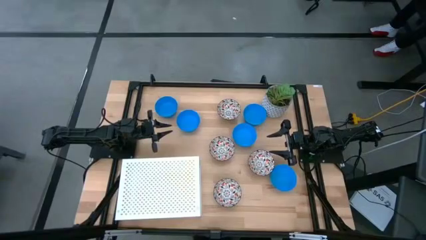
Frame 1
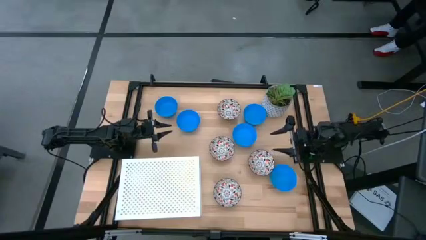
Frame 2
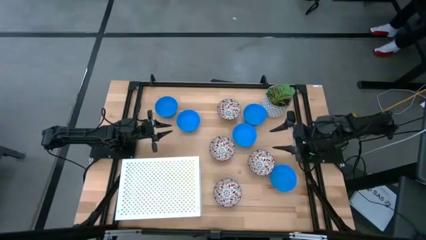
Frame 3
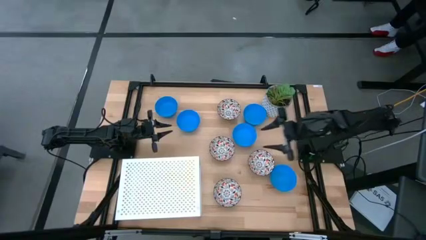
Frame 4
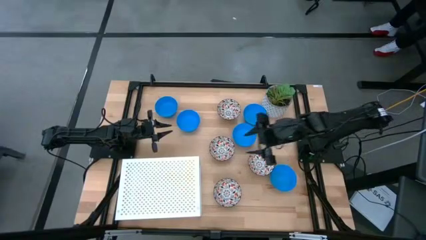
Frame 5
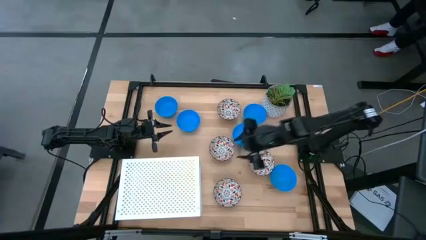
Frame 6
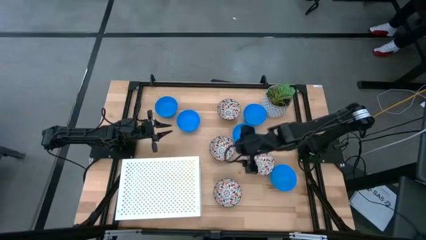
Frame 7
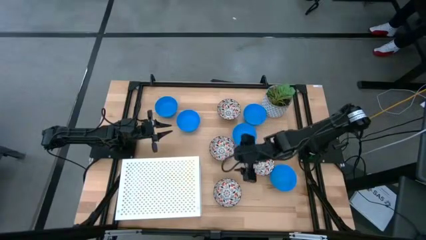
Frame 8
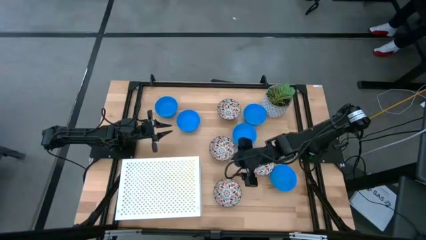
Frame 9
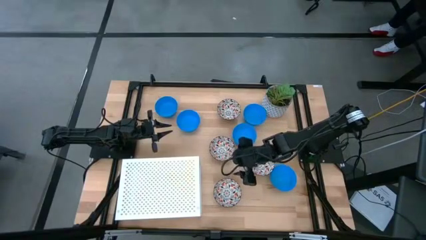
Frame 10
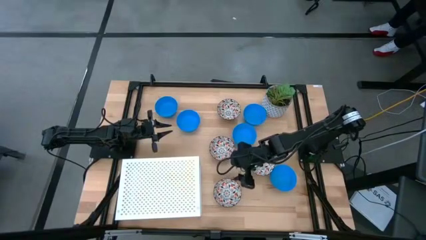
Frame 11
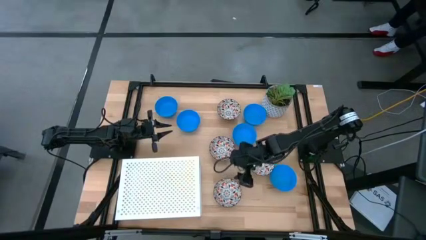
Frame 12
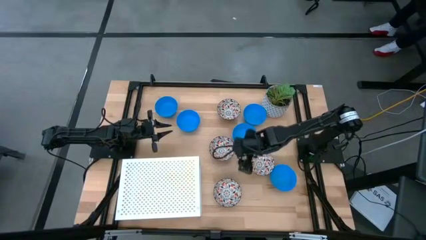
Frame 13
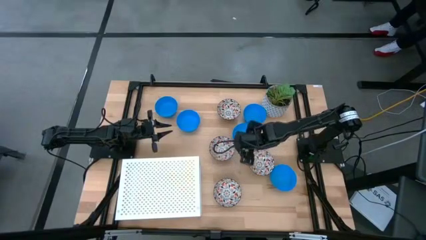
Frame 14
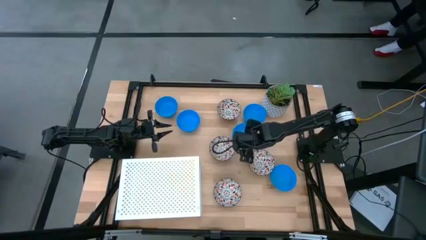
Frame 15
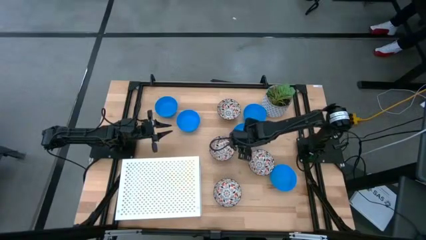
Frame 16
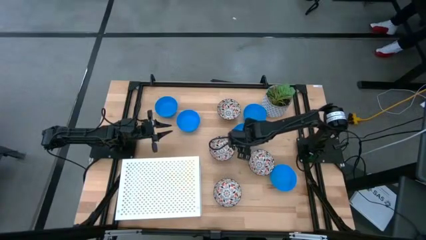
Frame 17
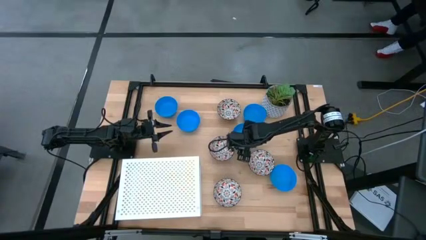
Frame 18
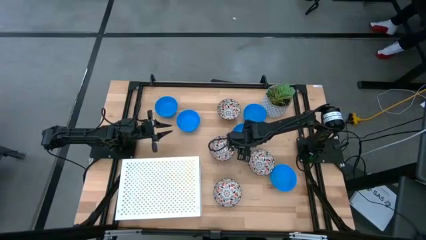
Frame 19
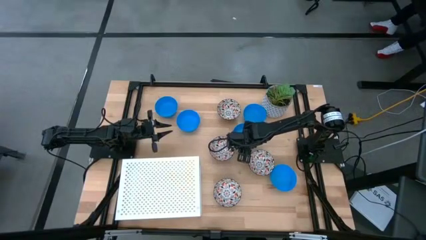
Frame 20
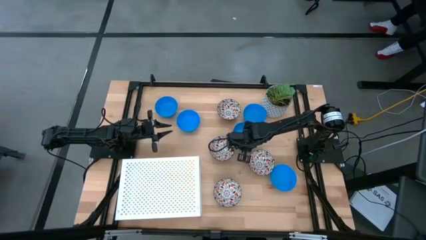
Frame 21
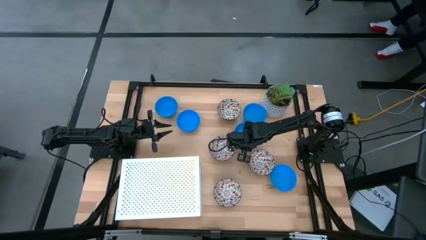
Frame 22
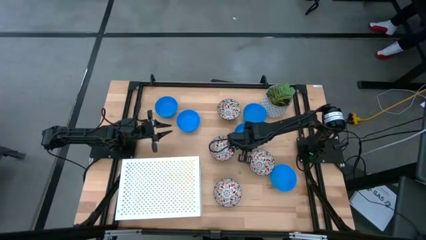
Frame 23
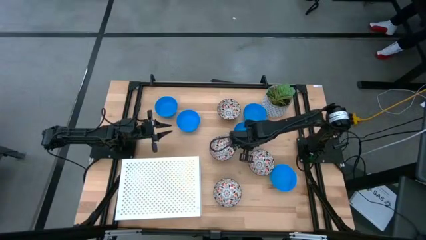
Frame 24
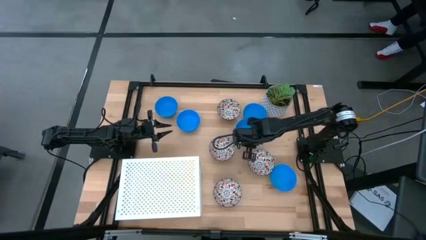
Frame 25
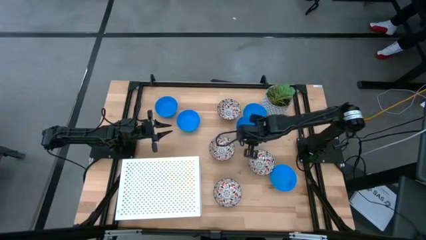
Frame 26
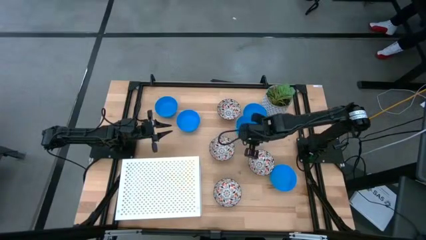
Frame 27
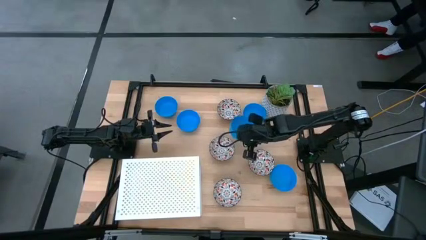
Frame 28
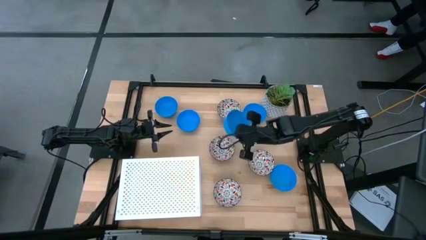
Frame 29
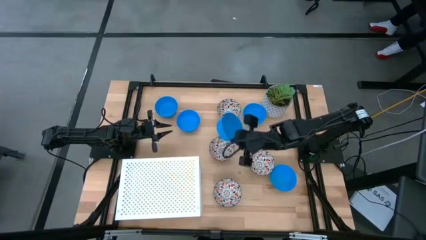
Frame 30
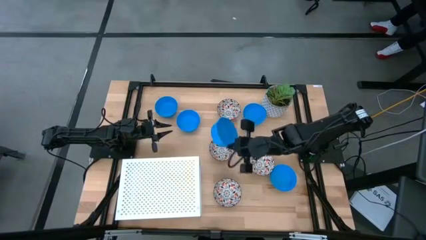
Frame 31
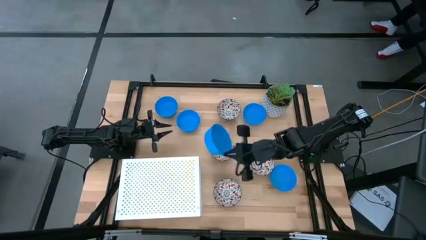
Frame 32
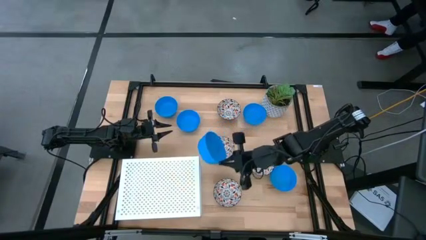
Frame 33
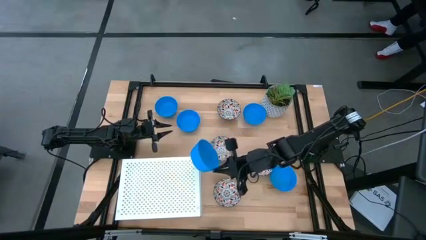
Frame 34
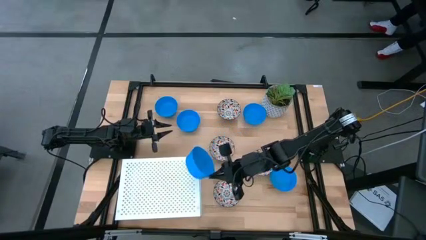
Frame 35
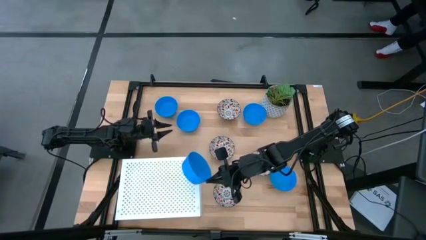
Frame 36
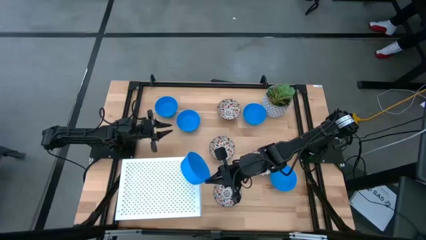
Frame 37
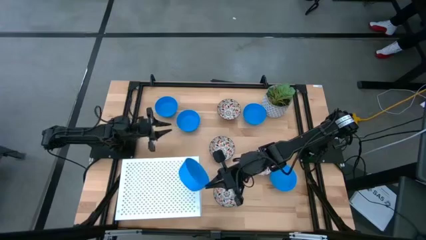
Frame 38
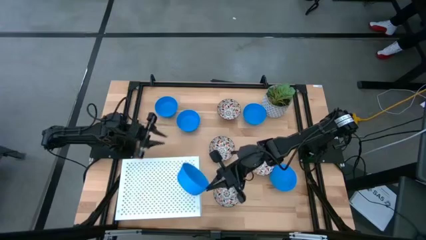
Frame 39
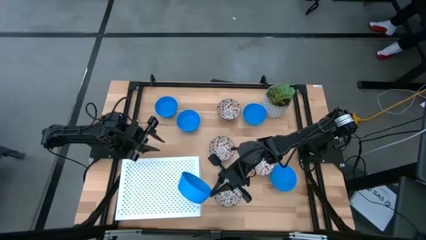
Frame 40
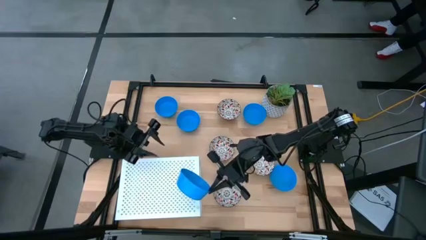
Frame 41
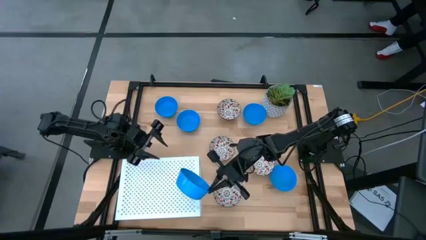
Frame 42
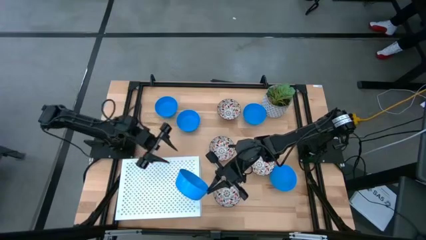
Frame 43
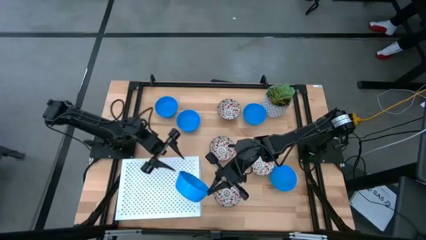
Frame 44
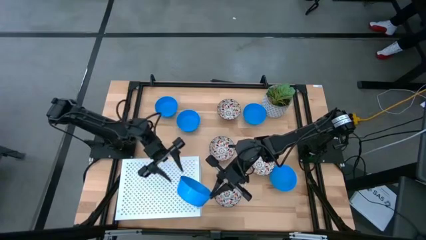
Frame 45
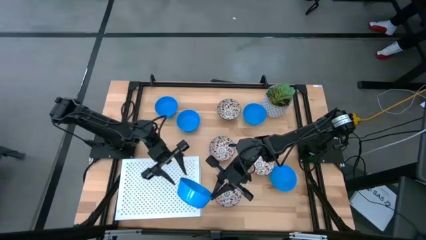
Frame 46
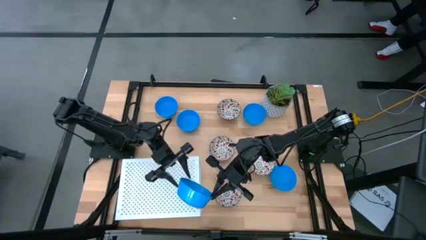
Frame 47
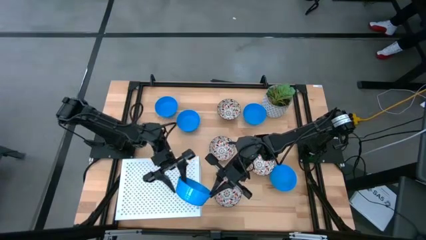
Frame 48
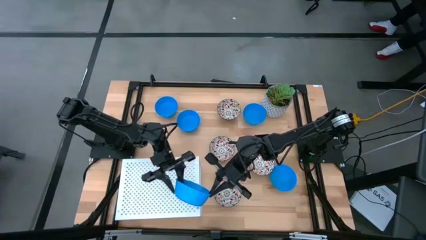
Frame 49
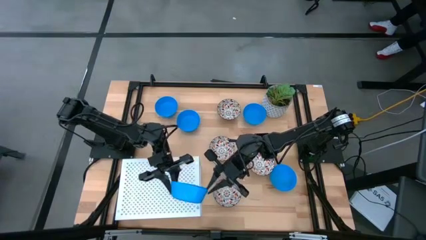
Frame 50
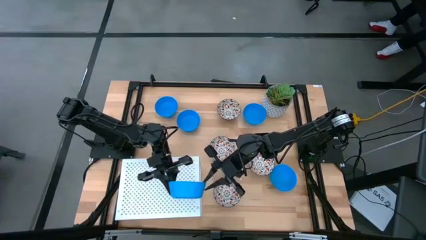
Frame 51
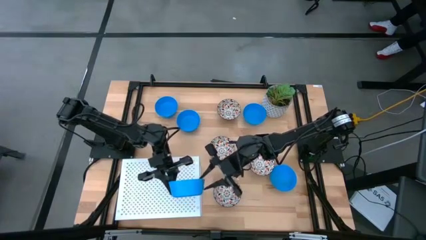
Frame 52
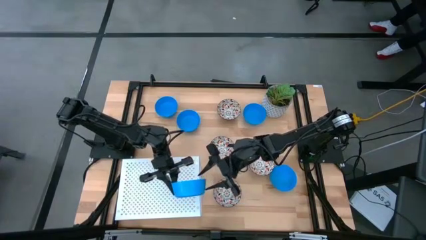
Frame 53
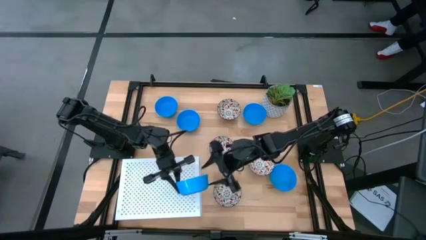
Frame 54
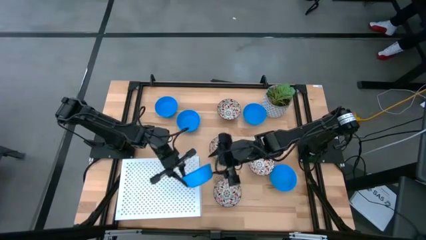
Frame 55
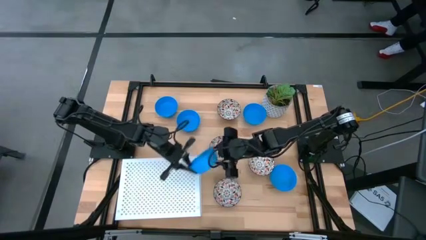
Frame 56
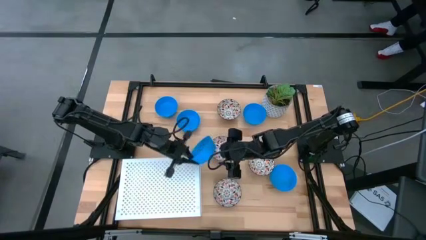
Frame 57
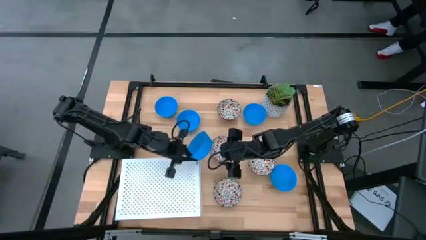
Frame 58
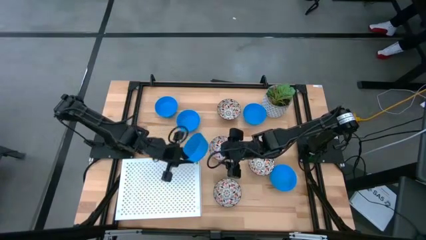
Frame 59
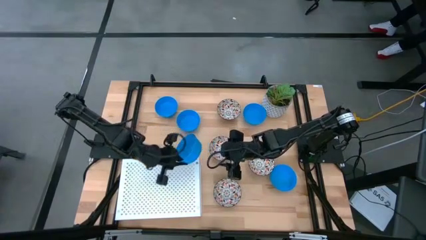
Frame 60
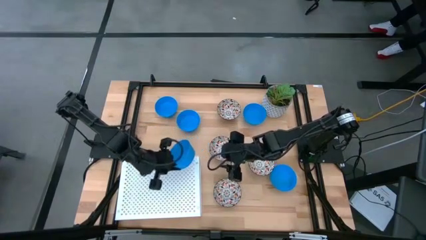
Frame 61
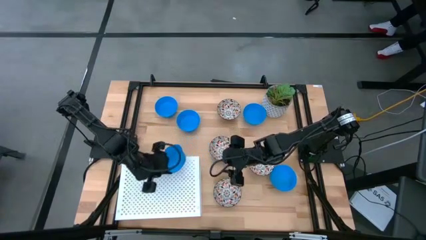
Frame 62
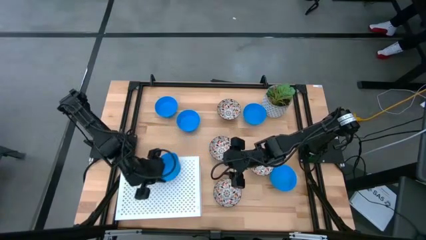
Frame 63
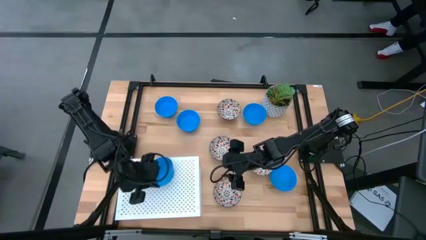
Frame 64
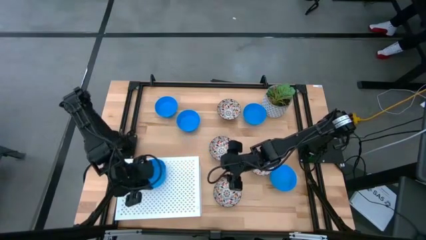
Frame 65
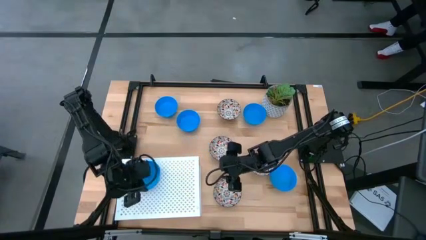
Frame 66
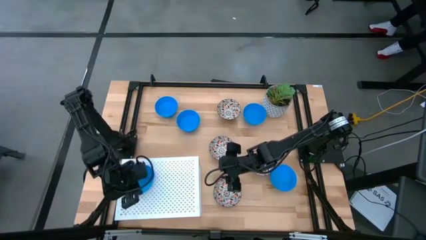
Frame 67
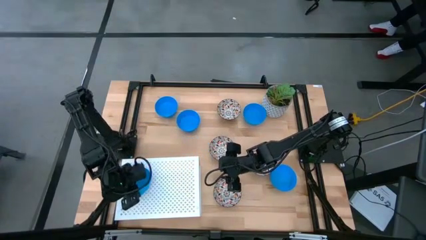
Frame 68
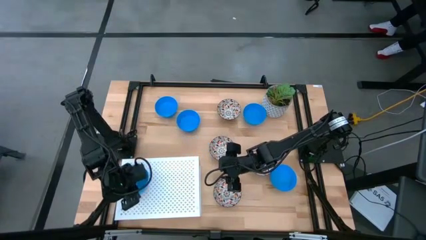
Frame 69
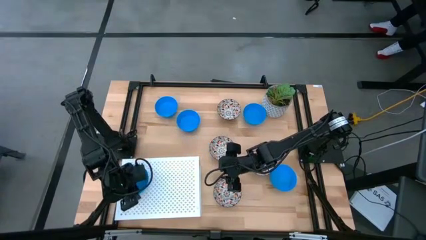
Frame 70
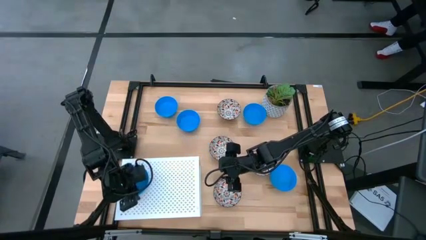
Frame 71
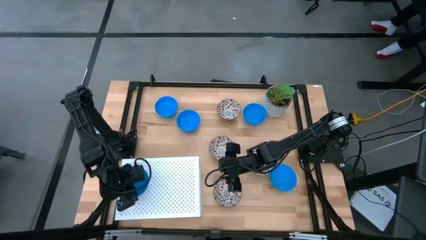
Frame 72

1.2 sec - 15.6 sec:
Task: Pick & Place Mini bowls
Put the blue bowl on the shelf
